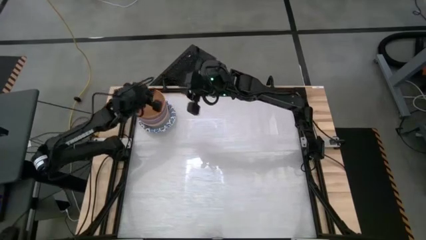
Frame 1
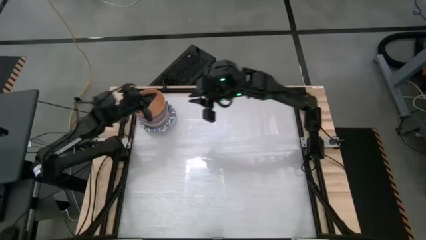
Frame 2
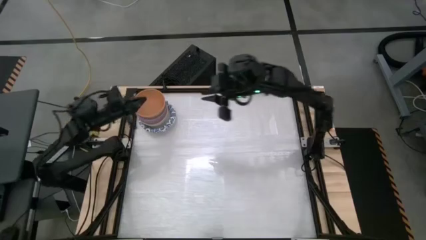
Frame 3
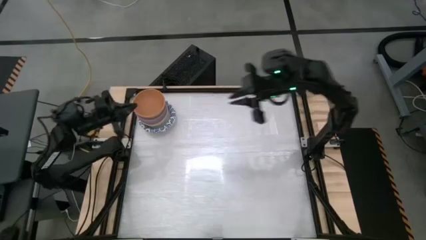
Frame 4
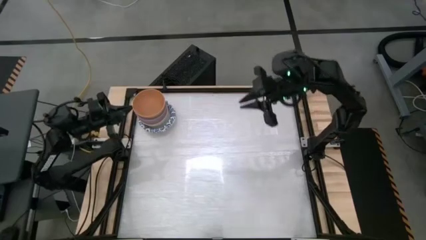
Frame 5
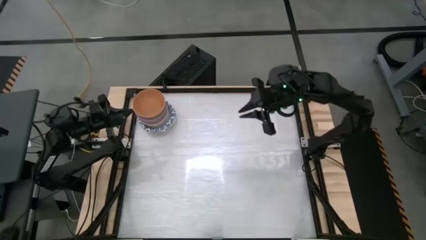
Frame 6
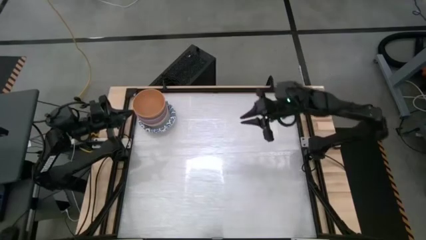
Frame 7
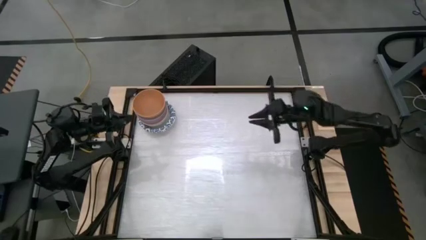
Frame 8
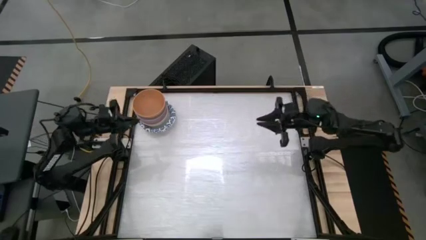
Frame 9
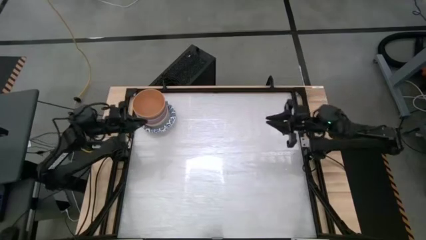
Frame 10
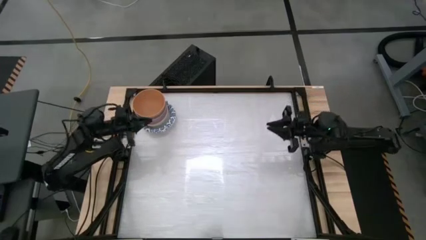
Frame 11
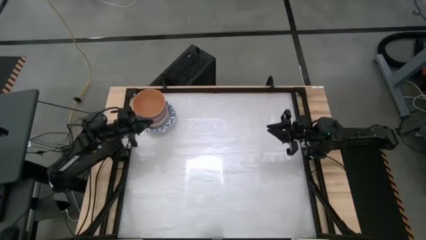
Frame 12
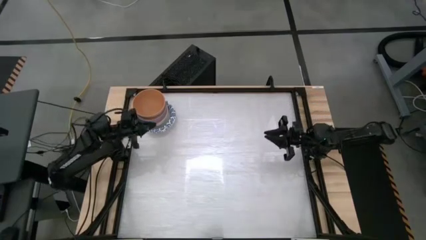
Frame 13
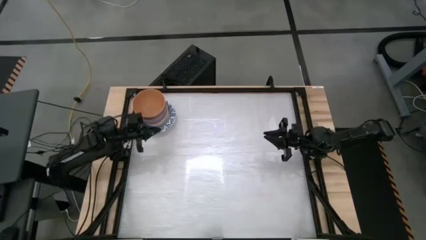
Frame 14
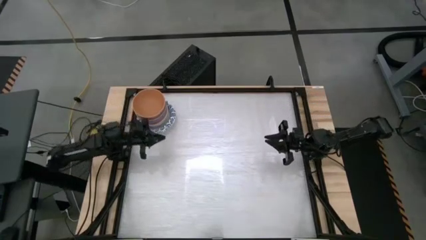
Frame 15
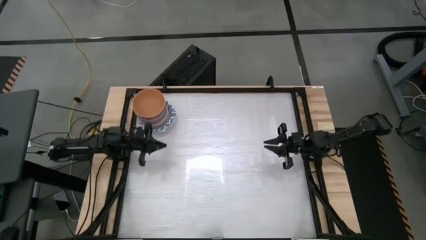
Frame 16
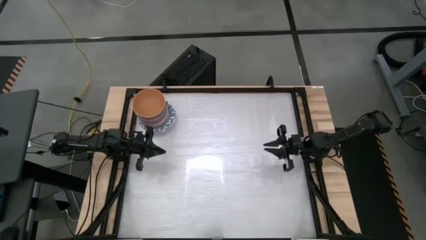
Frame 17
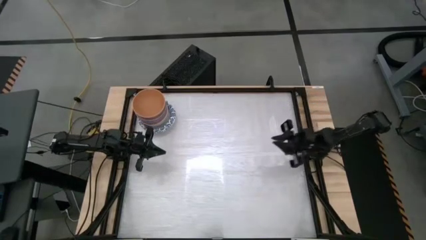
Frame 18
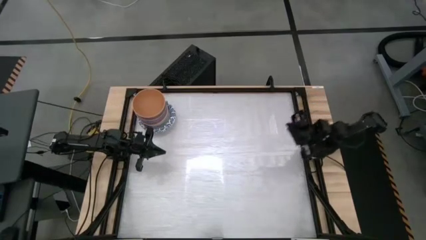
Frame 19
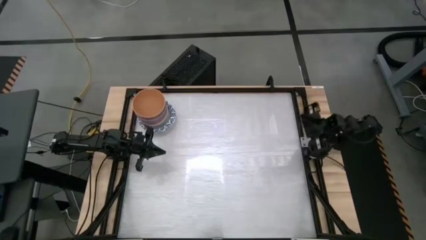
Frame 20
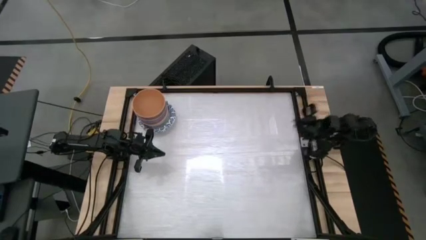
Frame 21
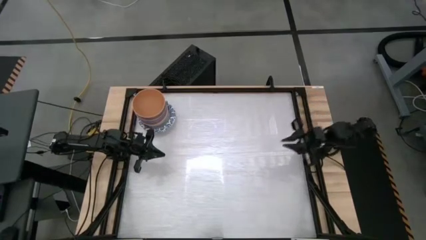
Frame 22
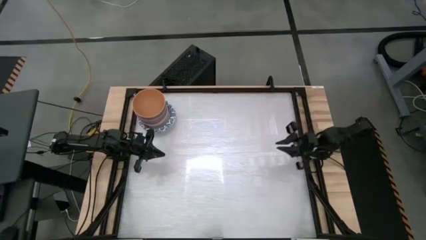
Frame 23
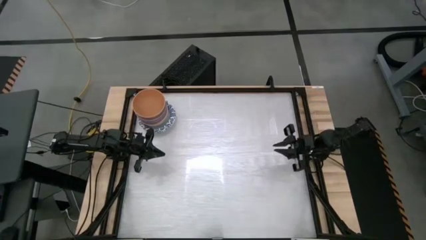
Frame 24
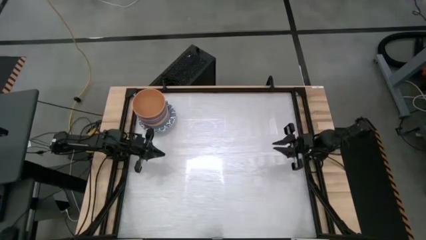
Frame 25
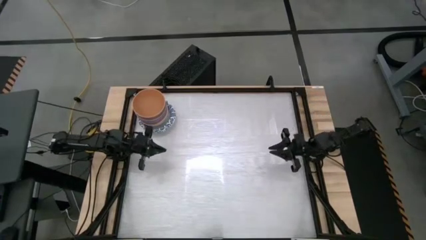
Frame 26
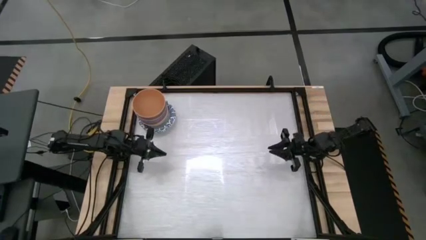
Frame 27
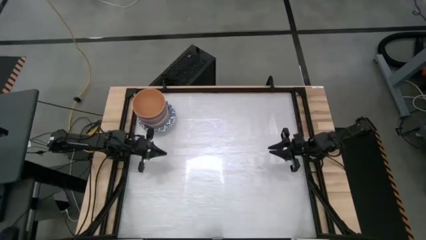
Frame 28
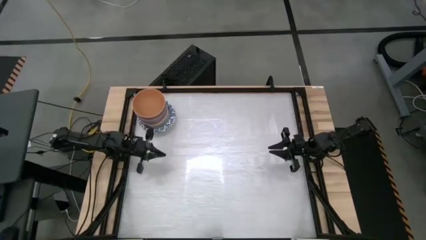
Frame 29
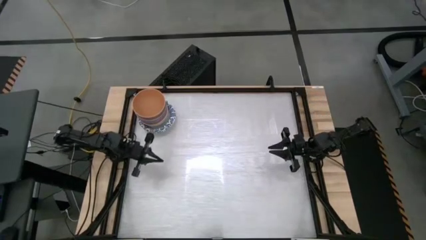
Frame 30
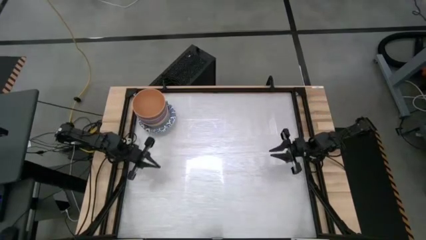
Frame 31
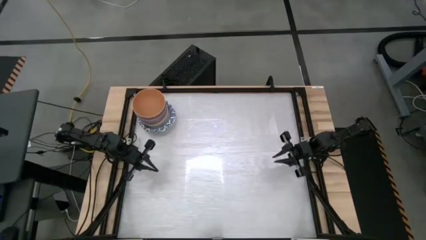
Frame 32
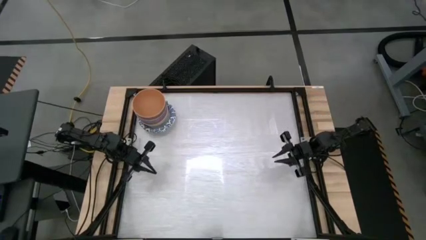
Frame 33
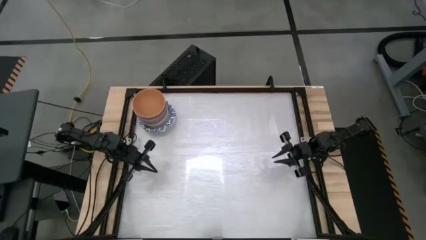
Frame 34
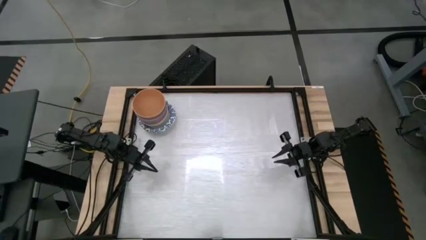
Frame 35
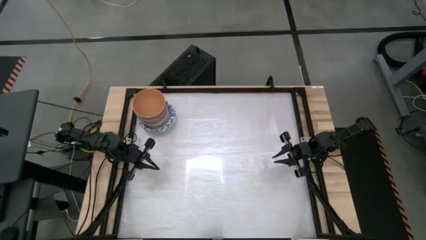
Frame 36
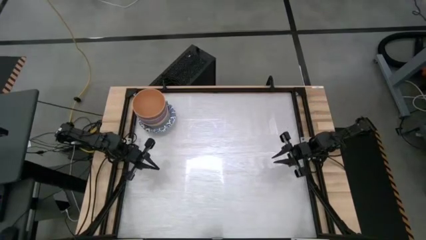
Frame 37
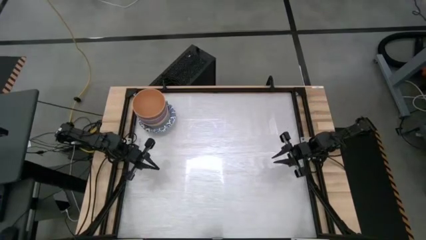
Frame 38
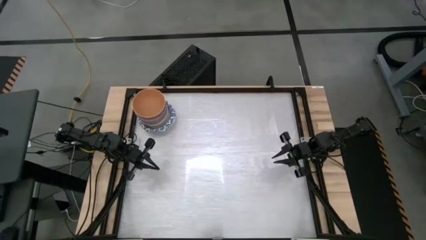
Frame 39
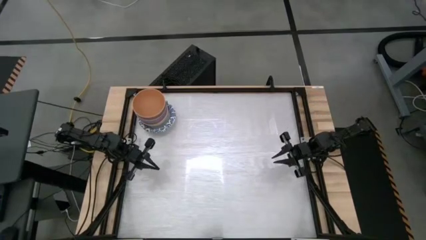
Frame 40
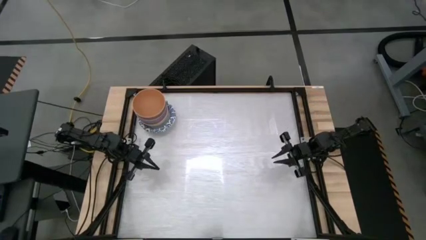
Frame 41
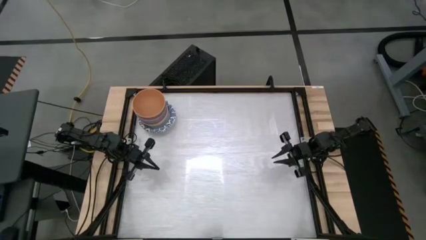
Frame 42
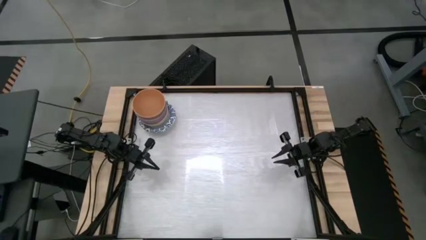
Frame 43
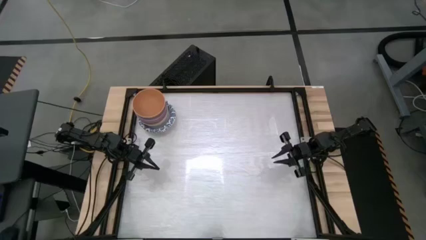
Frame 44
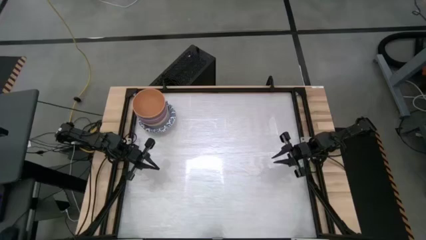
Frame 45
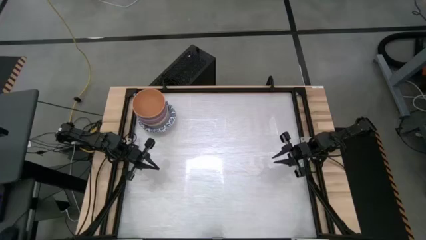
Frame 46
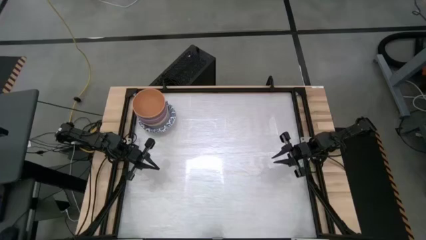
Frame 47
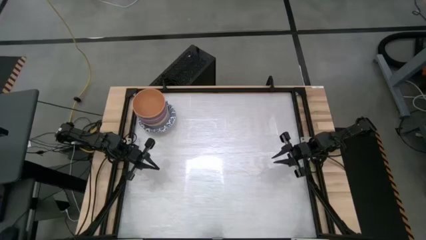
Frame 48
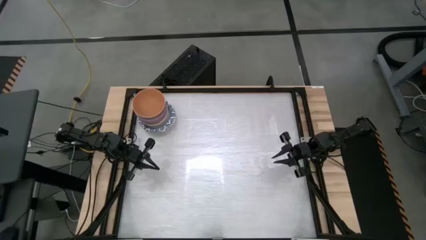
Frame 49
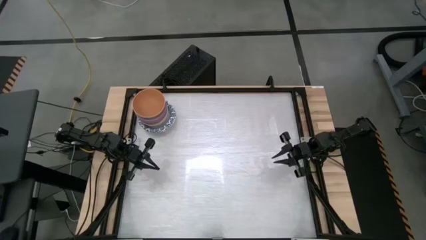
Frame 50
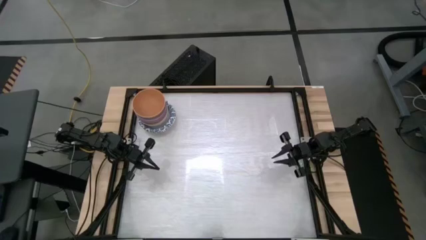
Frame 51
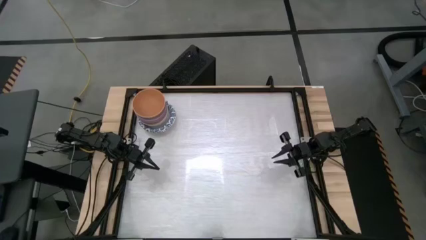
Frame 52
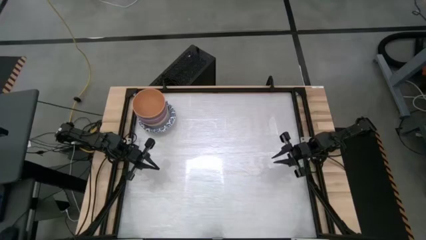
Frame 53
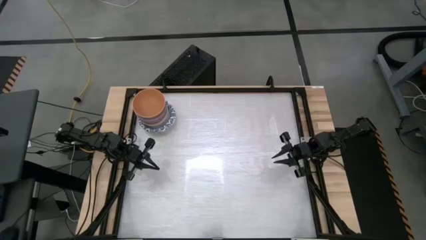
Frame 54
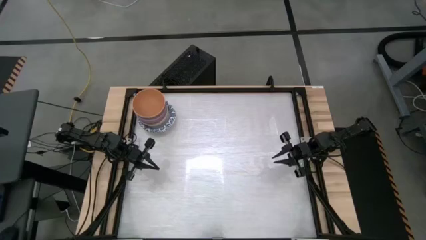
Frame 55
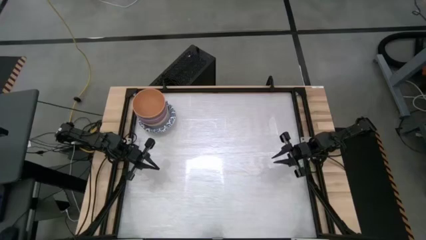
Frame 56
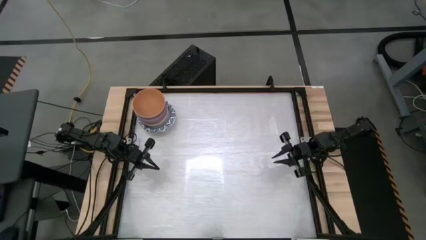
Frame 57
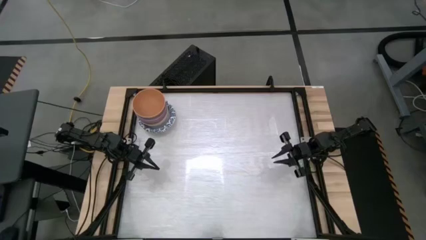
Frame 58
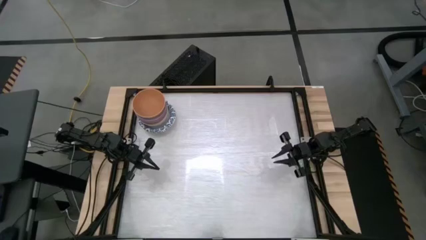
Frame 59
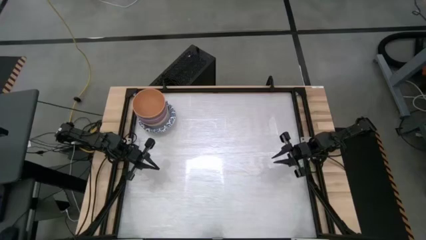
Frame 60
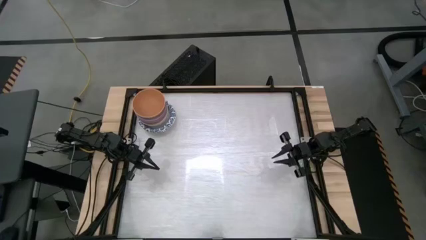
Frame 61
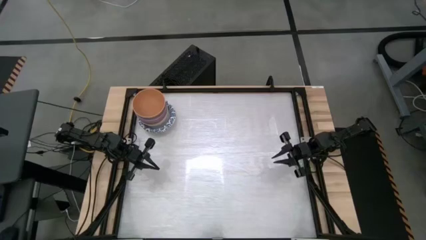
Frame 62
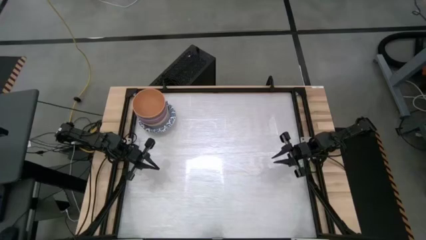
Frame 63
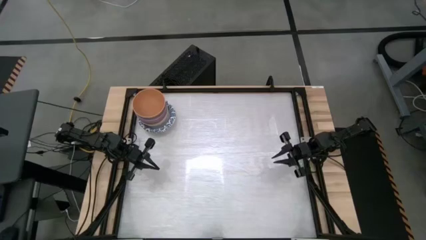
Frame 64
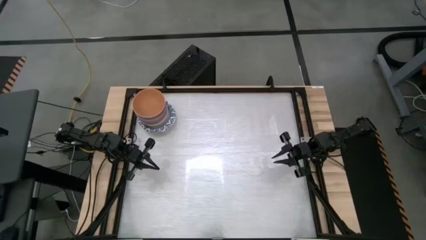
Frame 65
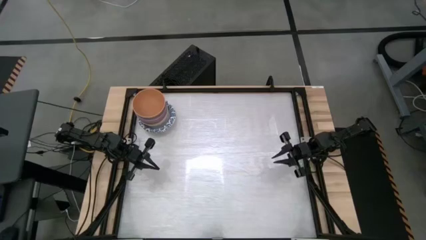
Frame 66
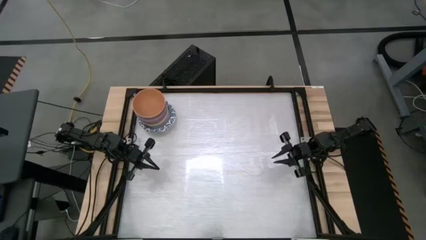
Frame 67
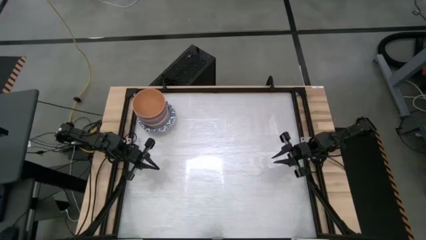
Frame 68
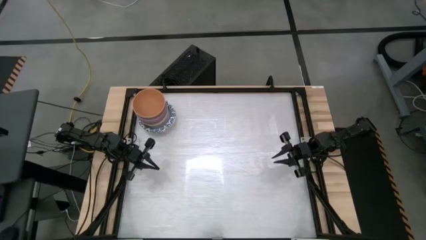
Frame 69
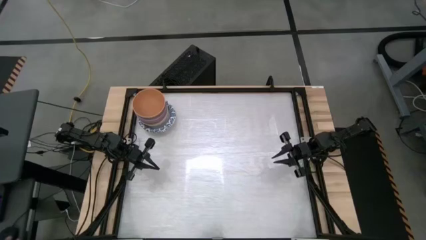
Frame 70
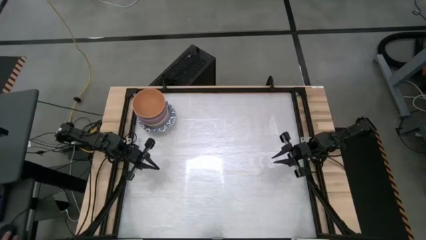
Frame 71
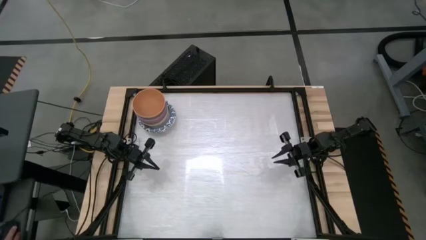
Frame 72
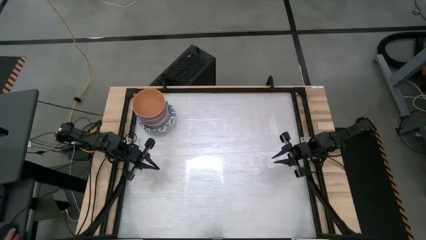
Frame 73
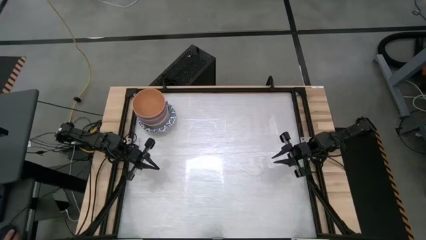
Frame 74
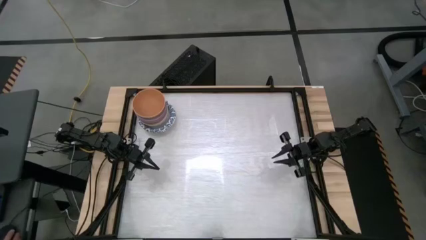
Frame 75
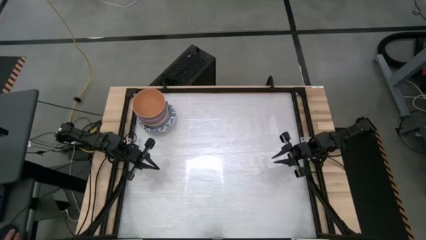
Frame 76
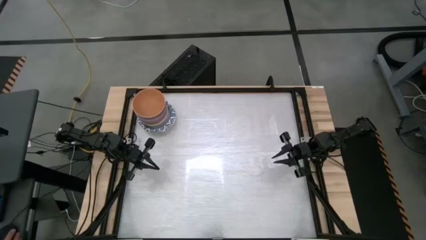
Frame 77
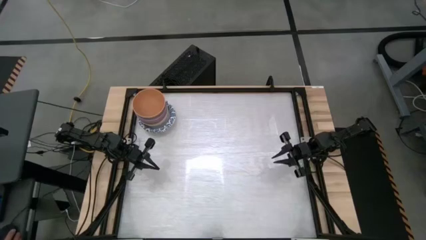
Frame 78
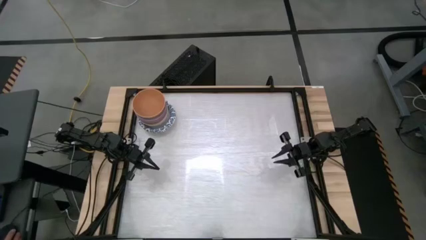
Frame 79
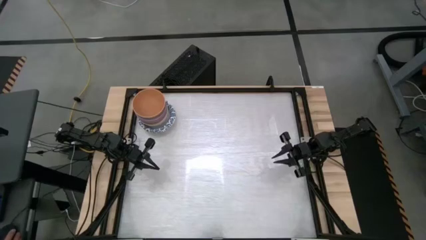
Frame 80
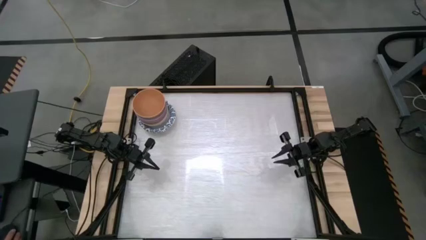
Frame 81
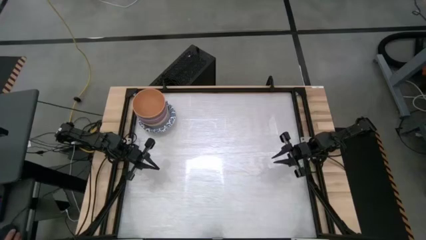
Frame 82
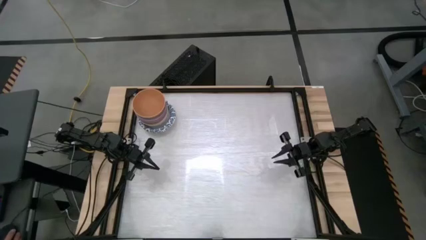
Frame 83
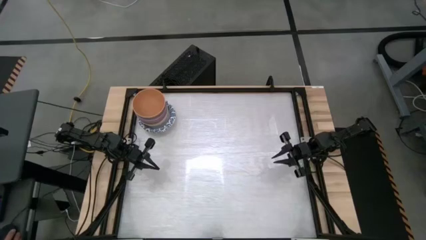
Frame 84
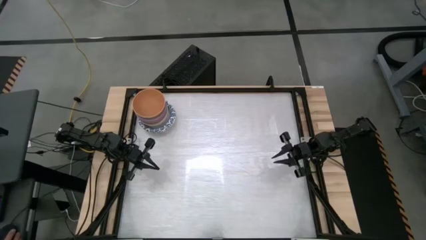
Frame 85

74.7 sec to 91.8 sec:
Return to Home Position
